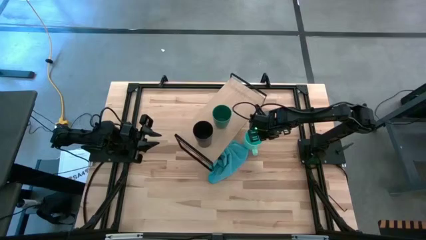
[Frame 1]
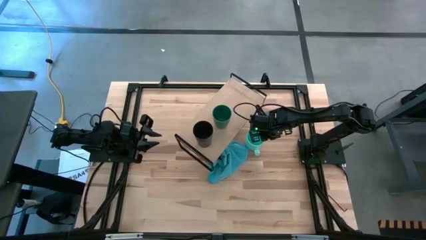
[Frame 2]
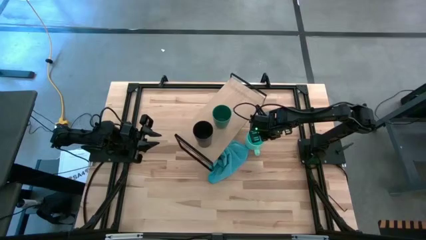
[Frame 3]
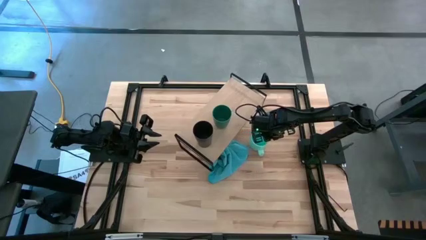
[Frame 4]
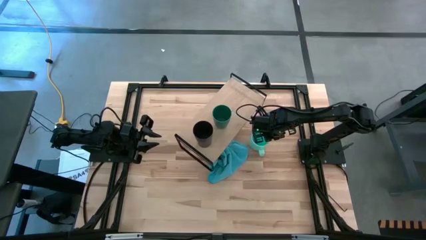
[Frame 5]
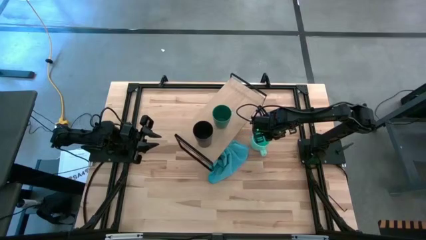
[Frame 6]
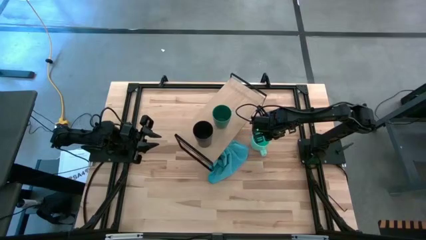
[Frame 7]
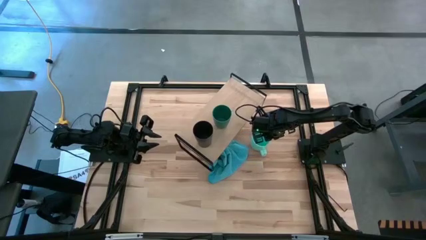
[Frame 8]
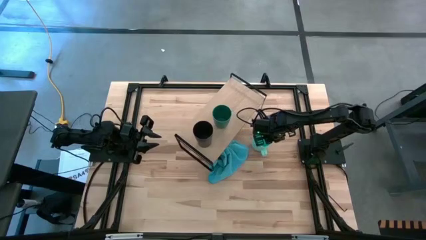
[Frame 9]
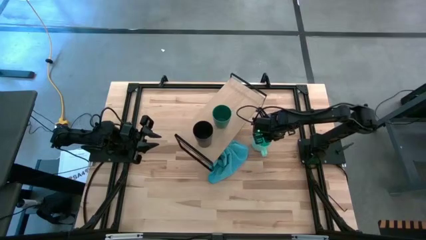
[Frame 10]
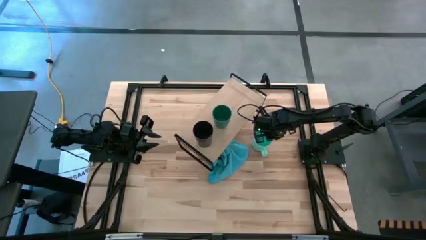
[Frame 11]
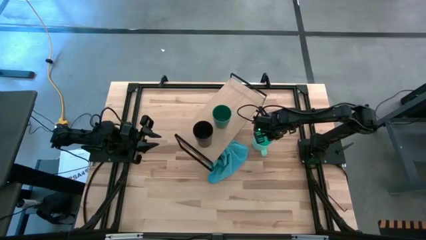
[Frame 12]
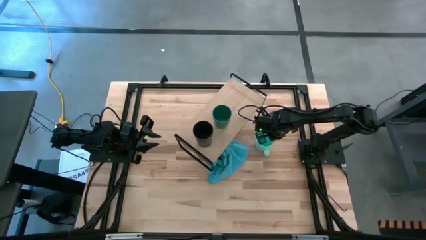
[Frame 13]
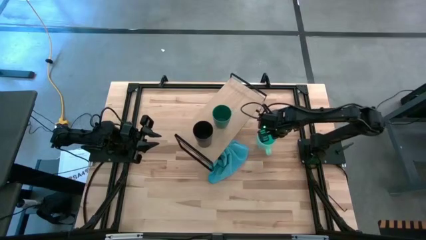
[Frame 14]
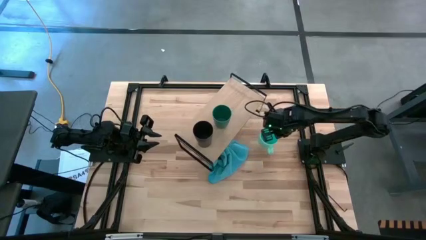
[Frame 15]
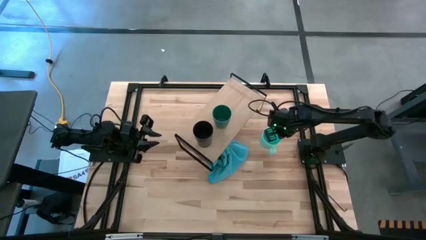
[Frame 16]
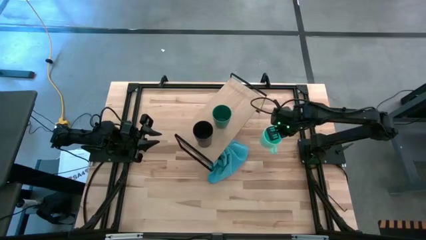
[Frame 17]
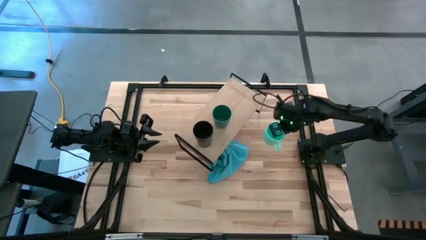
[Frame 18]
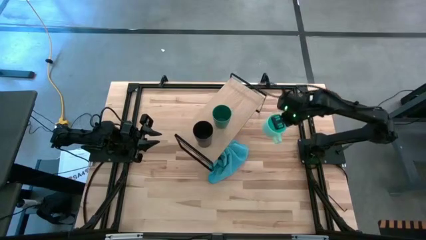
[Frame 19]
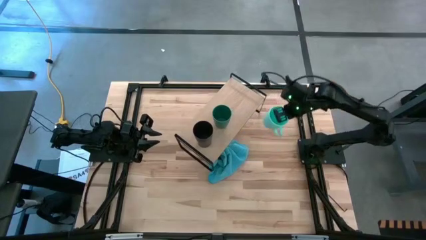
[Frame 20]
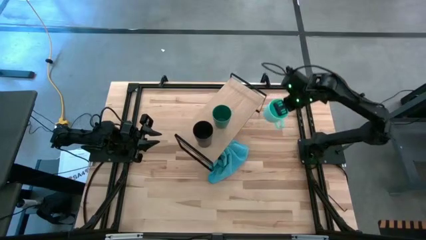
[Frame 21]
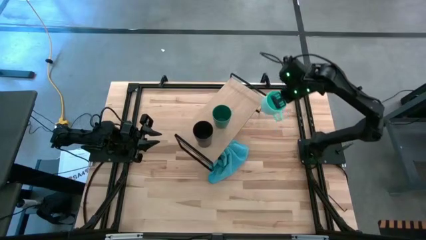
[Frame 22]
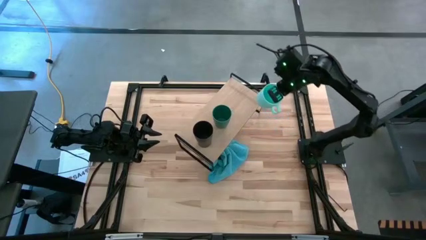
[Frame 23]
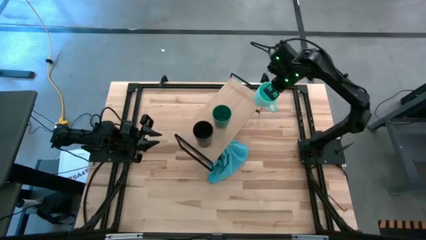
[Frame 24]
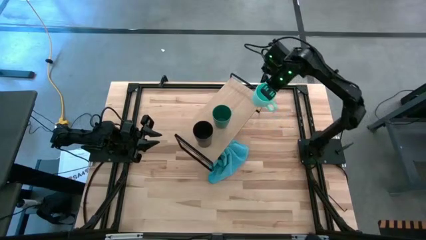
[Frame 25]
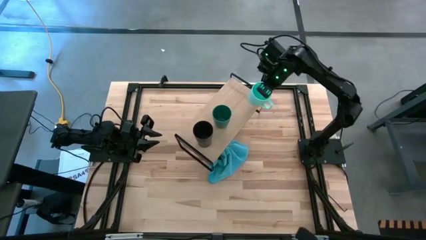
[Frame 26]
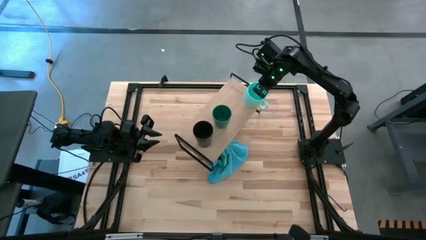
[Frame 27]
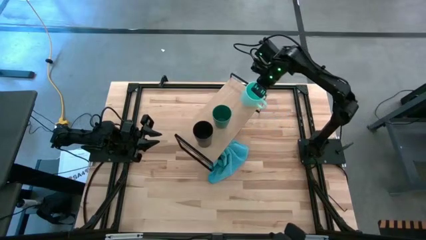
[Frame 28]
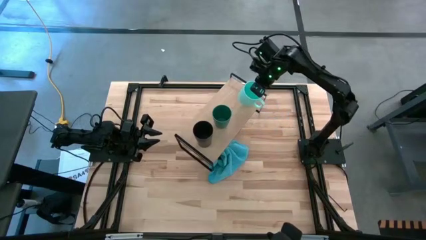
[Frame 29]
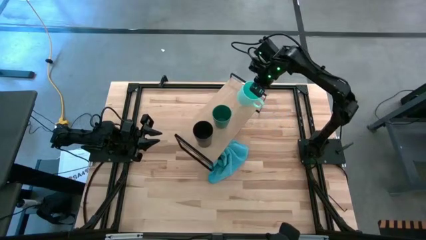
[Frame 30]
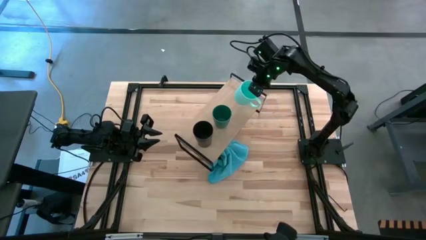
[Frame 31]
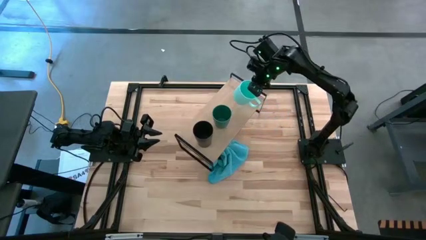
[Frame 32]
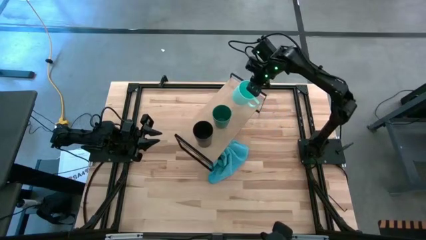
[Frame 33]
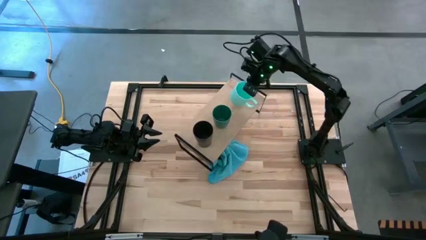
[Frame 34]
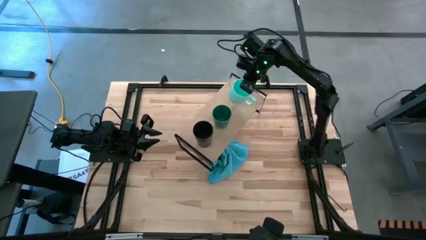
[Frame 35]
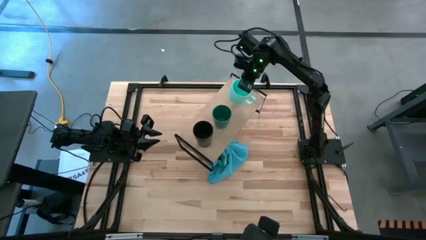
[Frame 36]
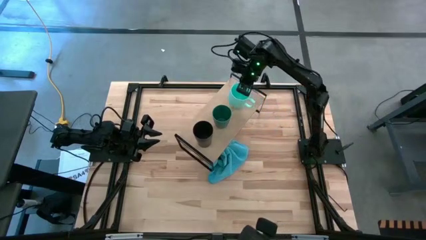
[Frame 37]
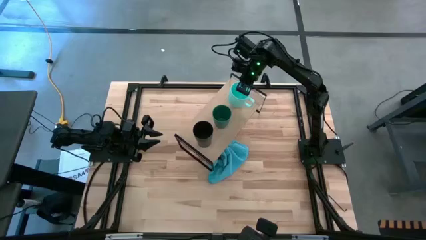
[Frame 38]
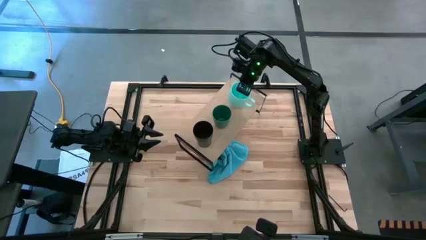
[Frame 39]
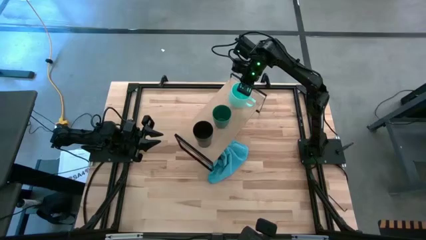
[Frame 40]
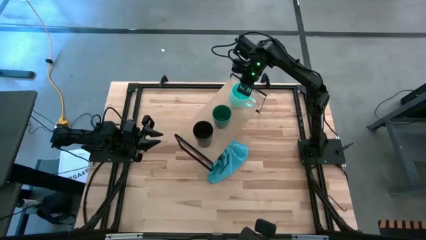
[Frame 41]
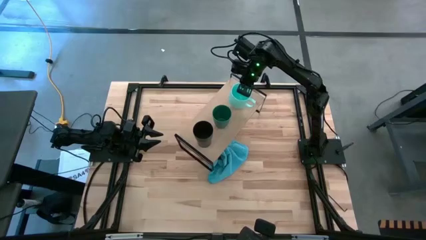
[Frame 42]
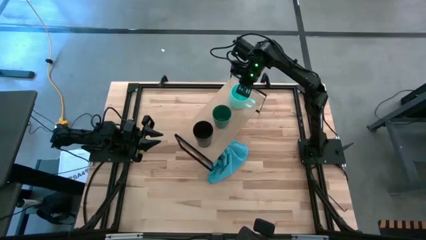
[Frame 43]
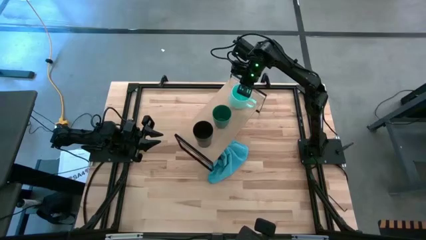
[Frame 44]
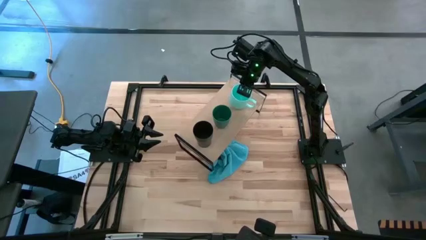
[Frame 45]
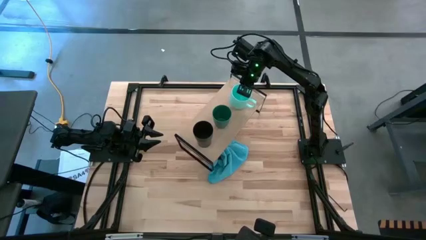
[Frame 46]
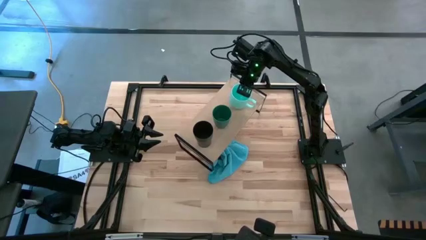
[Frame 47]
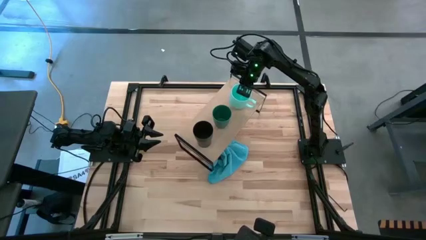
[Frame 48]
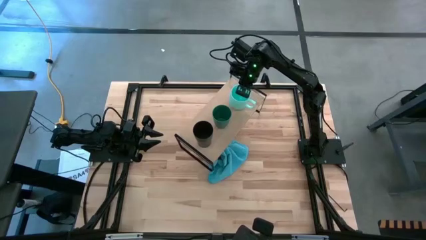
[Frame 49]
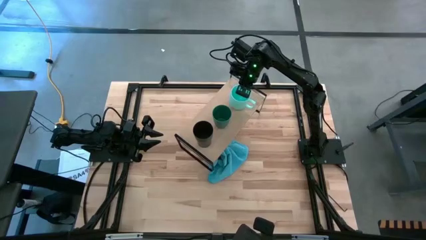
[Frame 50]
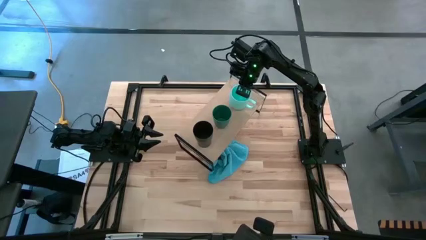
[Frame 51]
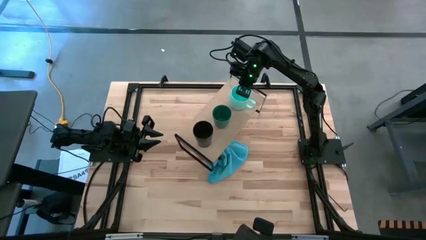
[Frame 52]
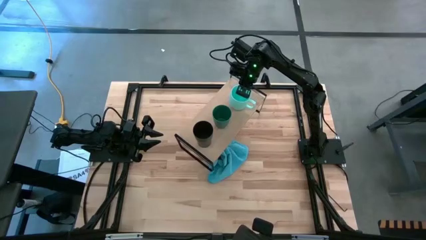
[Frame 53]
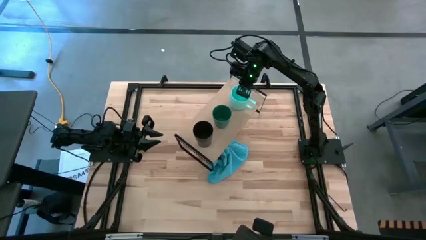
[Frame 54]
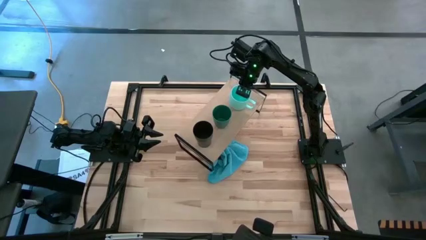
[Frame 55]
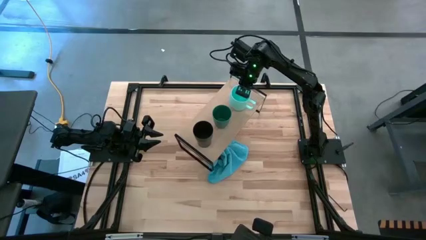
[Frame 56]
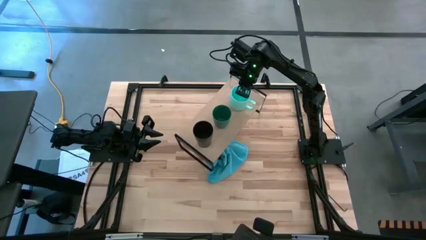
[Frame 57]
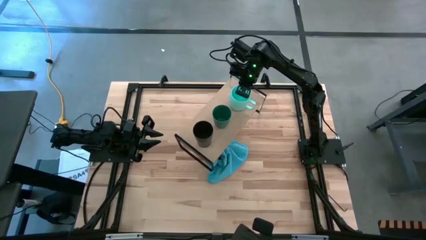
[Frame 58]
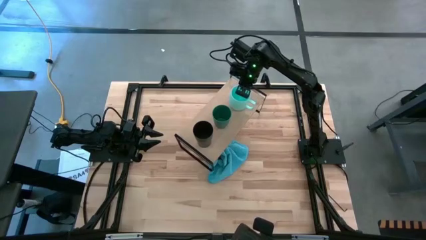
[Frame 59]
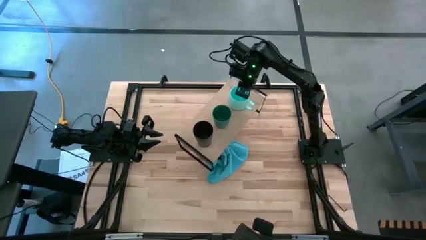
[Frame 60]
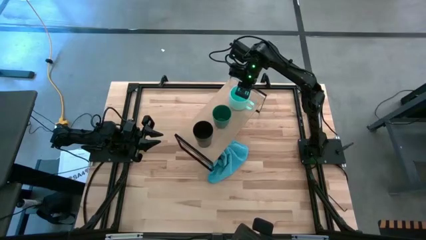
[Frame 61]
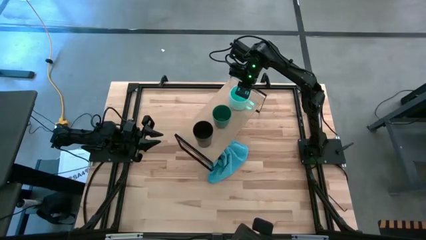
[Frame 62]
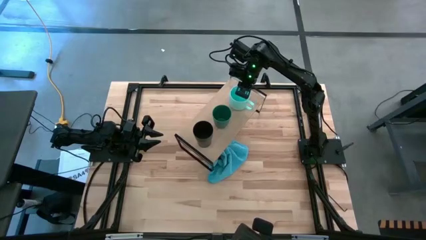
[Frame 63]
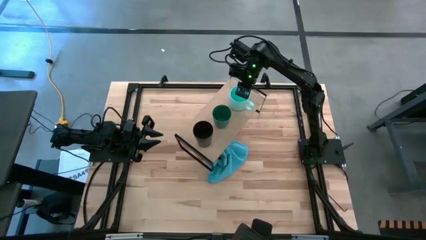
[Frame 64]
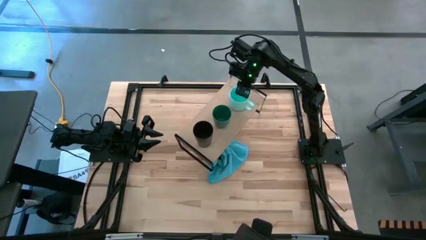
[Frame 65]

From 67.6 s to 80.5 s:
Task: Stack small to large cups/mugs on shelf
Put the light blue mug on the shelf

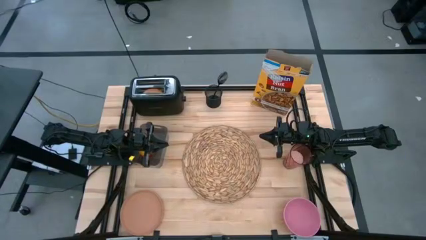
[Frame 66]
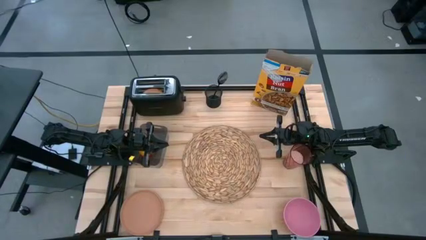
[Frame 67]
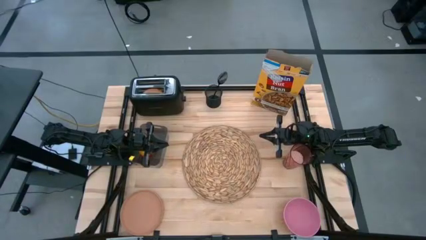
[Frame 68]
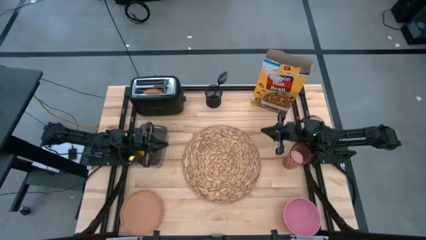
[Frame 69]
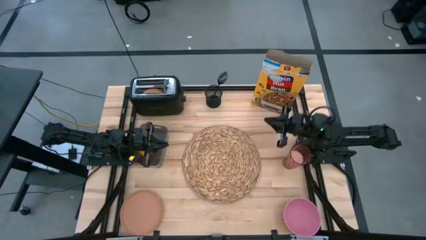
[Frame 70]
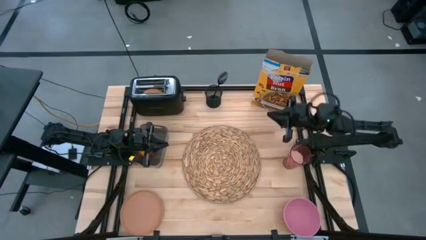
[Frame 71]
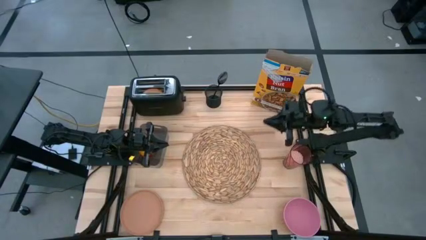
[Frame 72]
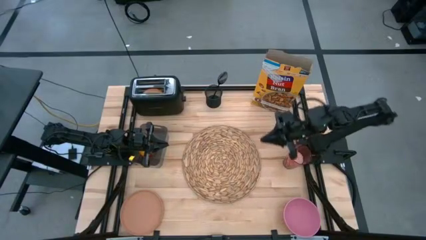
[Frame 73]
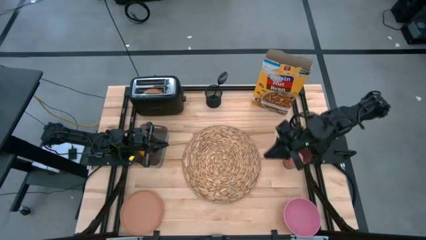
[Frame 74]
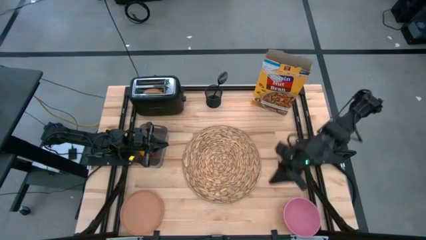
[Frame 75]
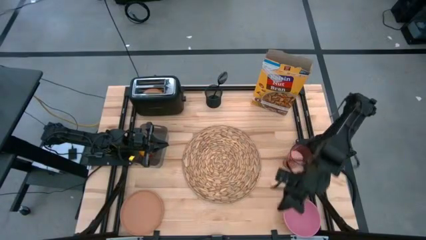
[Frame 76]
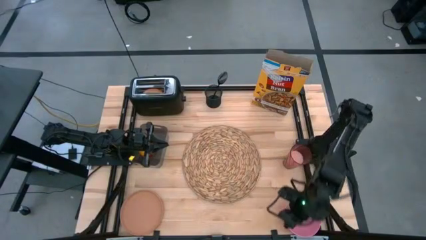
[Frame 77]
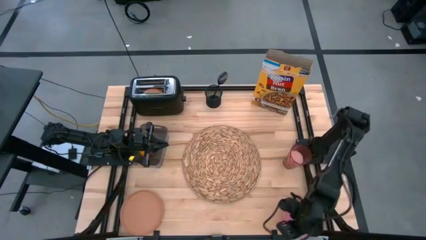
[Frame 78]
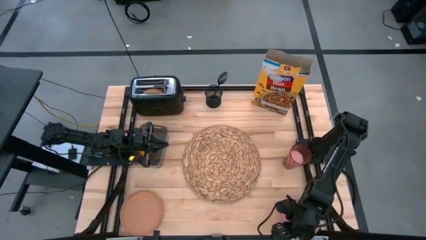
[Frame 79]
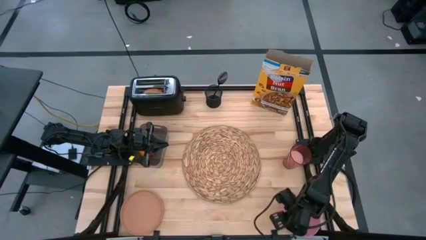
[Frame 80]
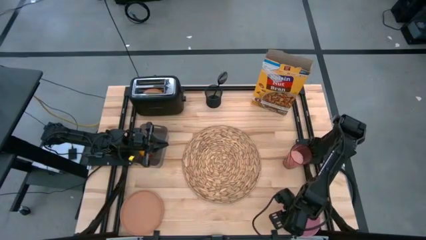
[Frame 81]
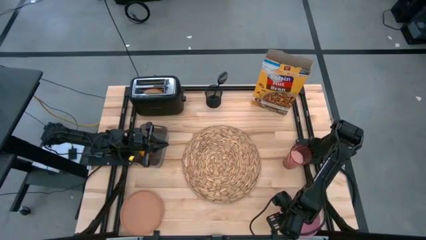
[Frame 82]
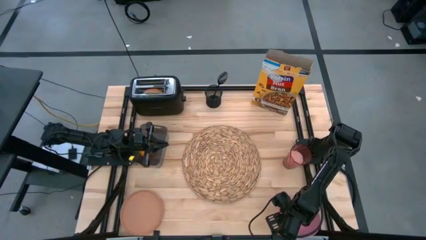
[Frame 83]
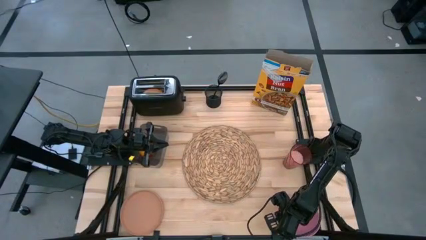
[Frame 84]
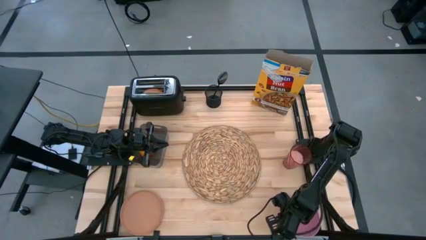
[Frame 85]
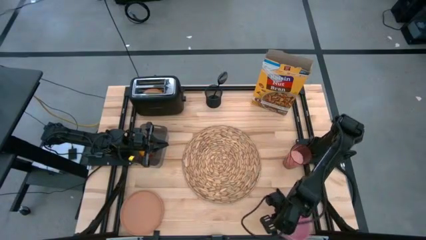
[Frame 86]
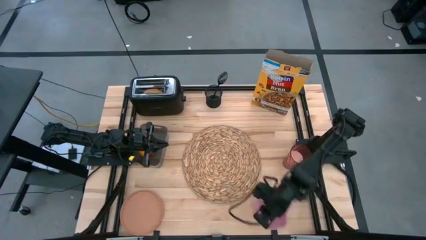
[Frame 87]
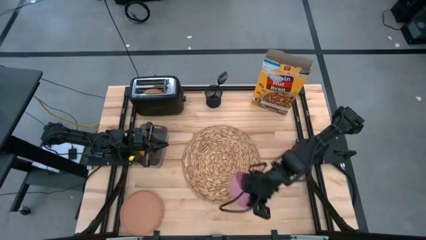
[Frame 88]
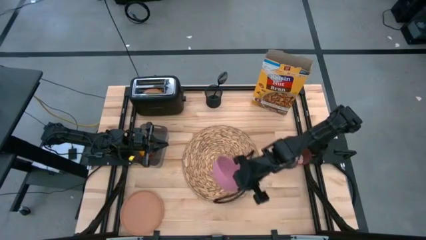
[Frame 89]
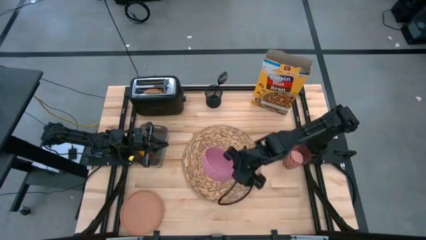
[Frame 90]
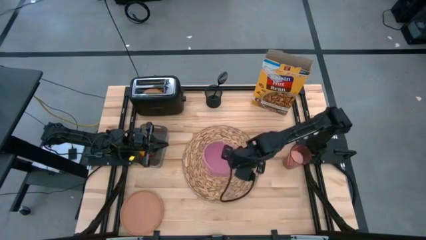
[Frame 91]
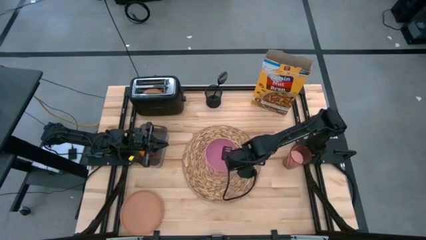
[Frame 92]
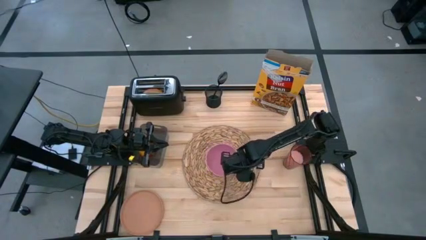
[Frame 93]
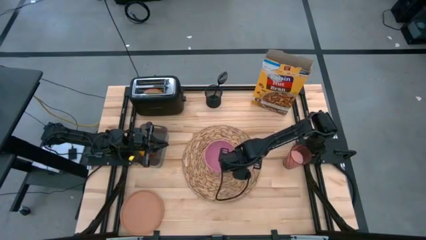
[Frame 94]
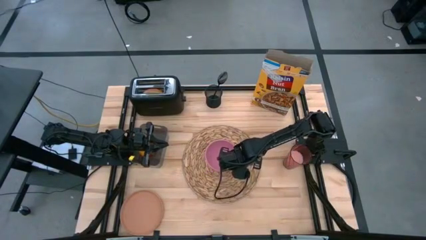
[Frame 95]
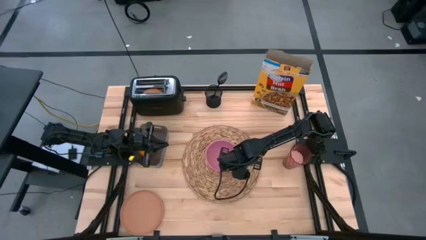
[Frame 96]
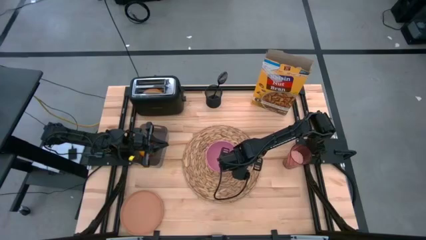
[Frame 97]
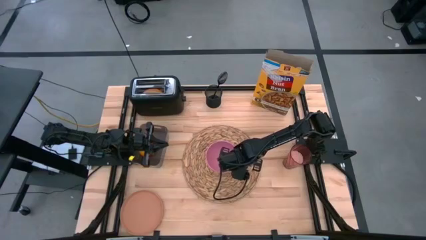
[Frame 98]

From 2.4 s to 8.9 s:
Task: Arrange a breakfast setting
Put the pink bowl at the center of the brown mat
